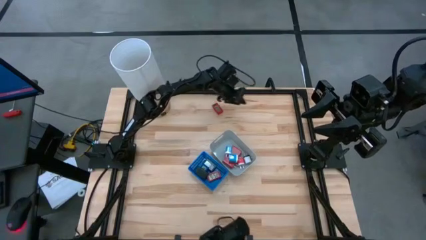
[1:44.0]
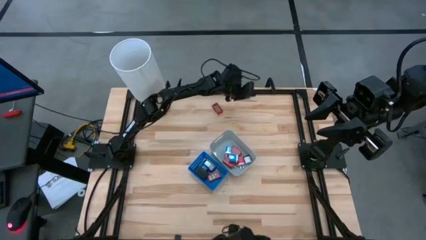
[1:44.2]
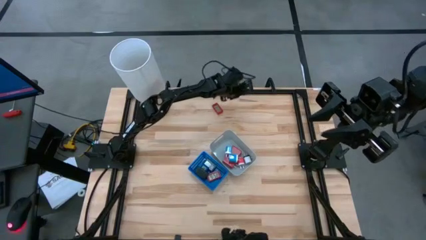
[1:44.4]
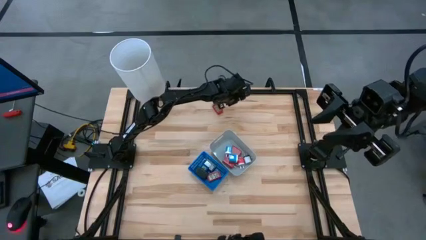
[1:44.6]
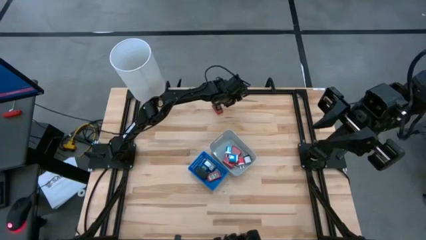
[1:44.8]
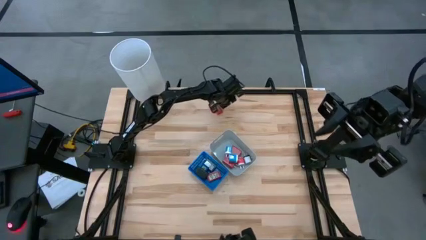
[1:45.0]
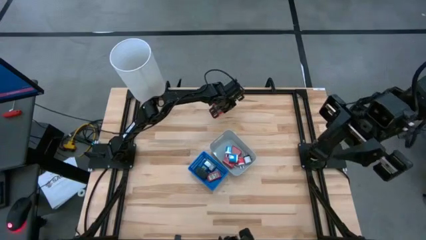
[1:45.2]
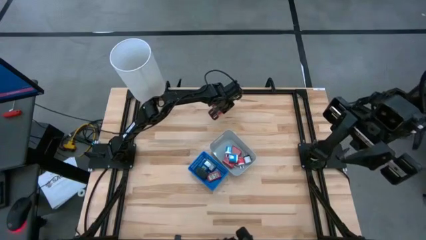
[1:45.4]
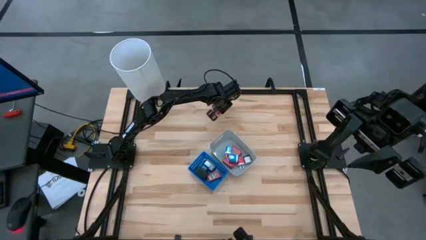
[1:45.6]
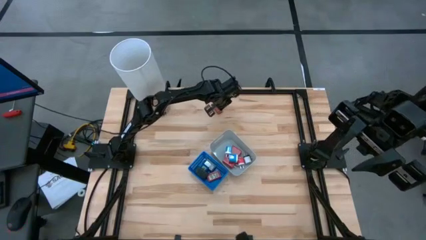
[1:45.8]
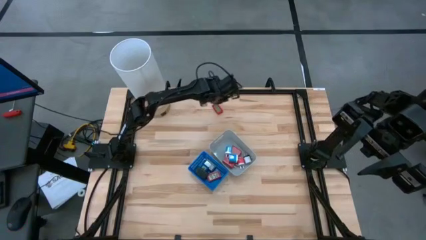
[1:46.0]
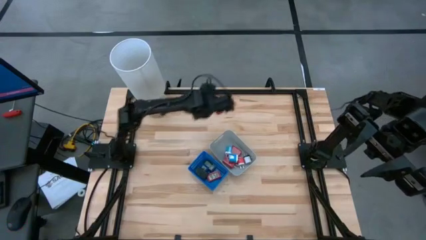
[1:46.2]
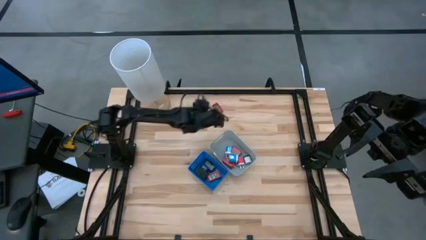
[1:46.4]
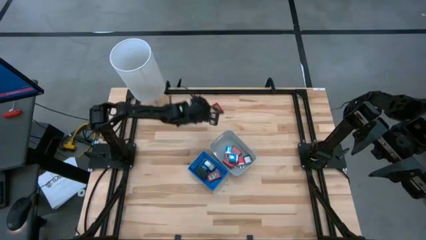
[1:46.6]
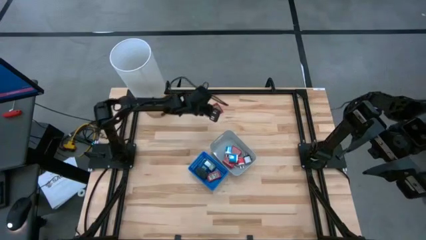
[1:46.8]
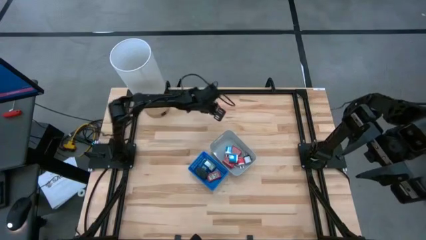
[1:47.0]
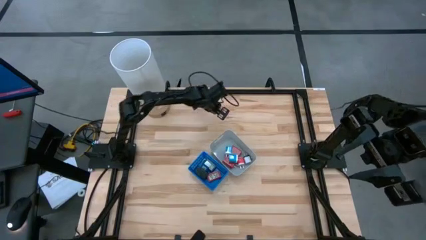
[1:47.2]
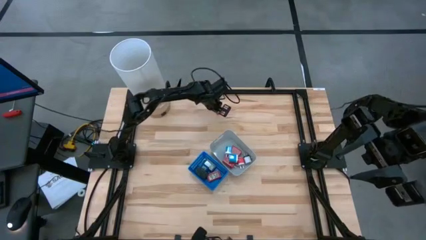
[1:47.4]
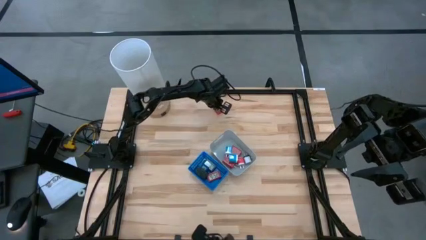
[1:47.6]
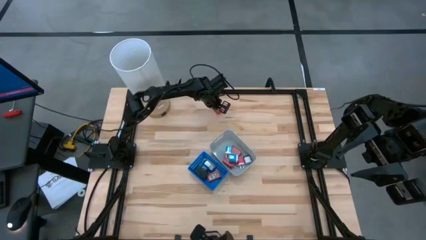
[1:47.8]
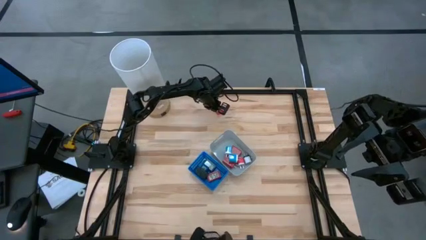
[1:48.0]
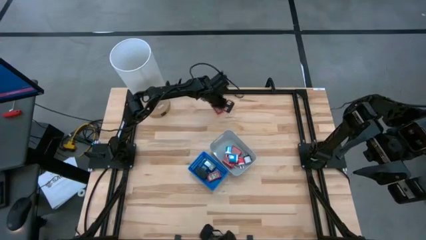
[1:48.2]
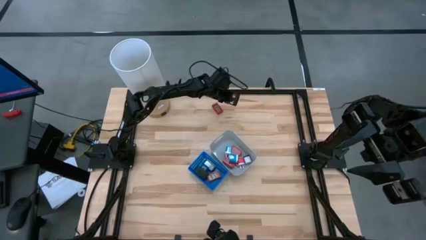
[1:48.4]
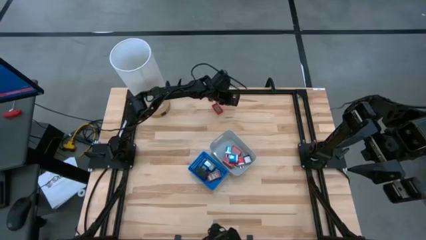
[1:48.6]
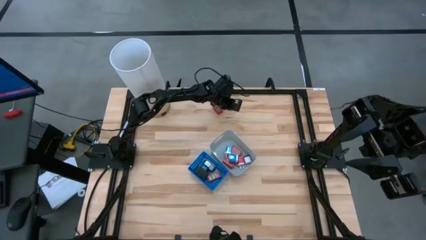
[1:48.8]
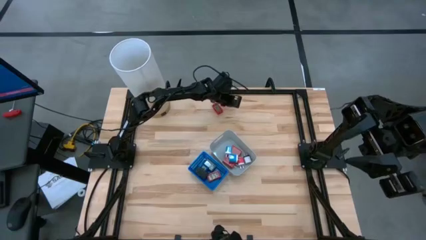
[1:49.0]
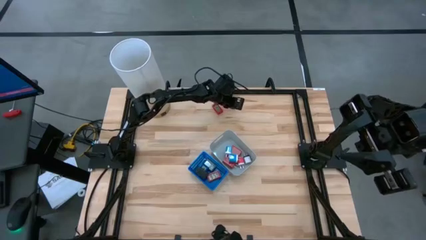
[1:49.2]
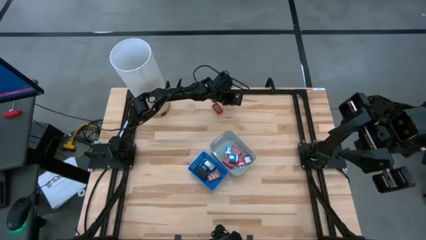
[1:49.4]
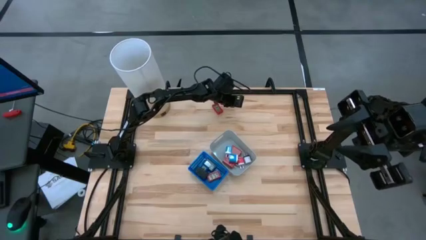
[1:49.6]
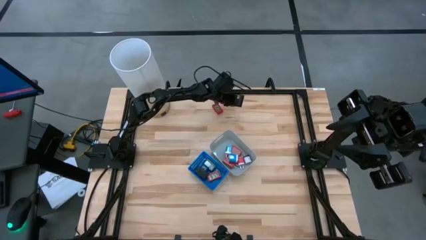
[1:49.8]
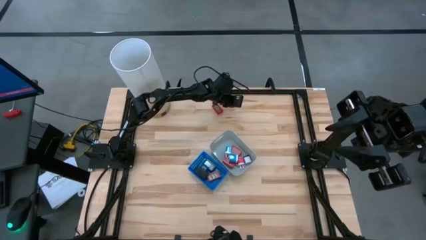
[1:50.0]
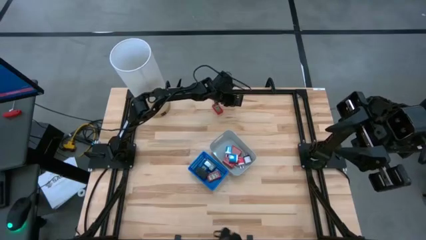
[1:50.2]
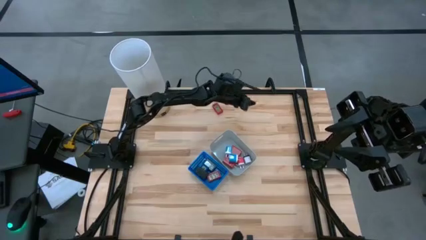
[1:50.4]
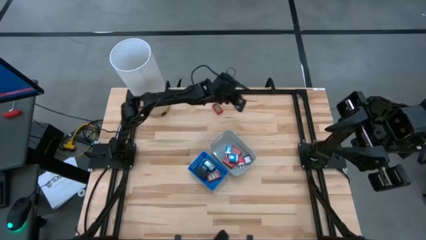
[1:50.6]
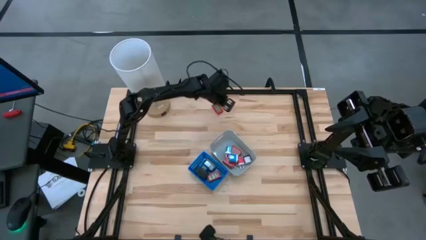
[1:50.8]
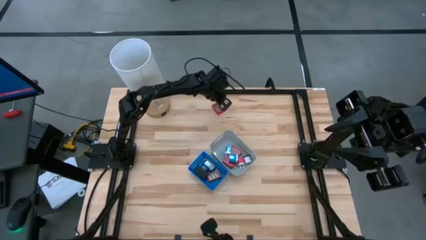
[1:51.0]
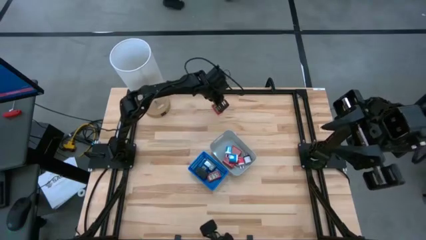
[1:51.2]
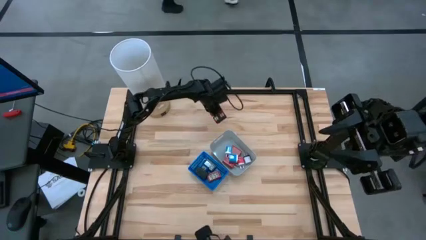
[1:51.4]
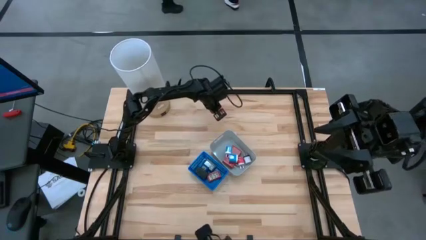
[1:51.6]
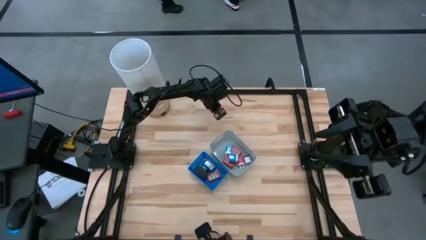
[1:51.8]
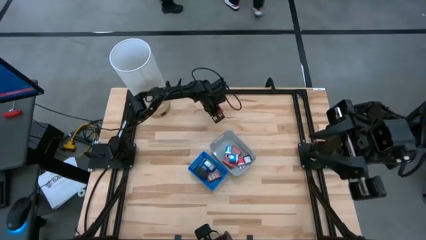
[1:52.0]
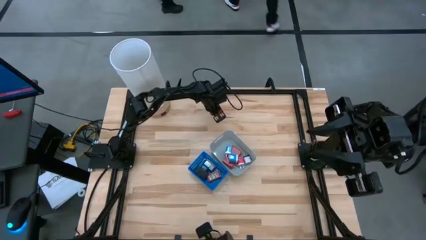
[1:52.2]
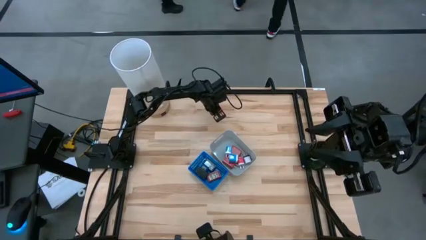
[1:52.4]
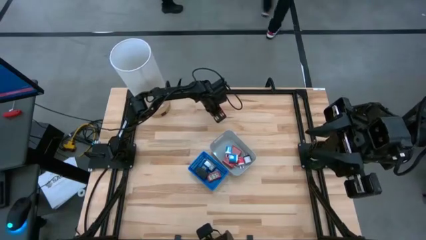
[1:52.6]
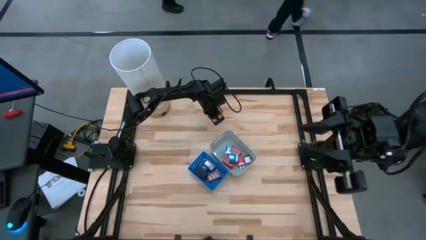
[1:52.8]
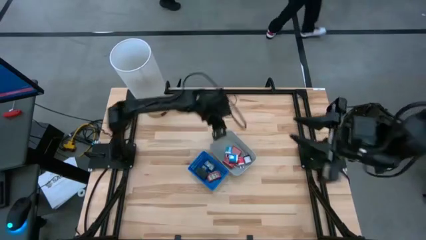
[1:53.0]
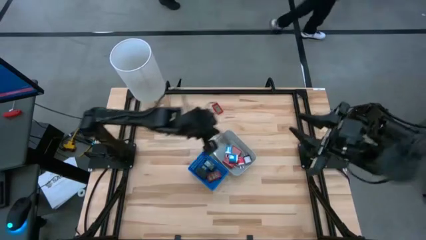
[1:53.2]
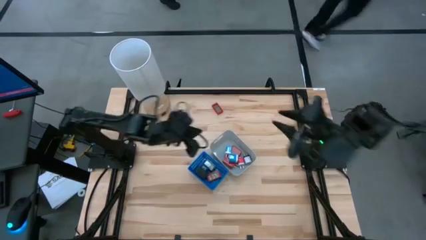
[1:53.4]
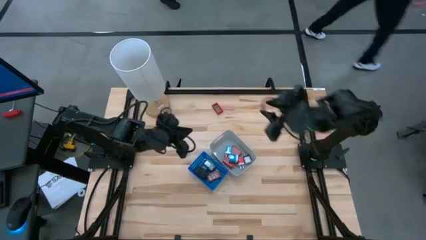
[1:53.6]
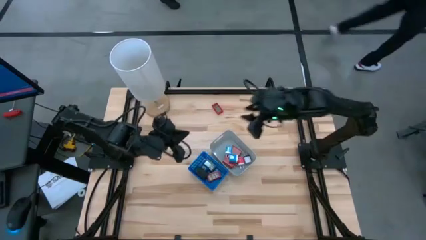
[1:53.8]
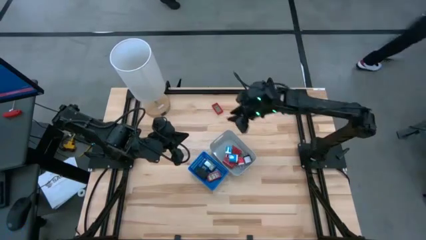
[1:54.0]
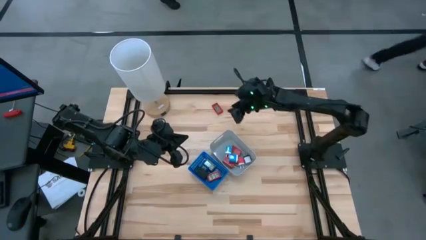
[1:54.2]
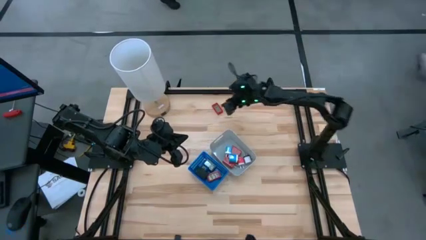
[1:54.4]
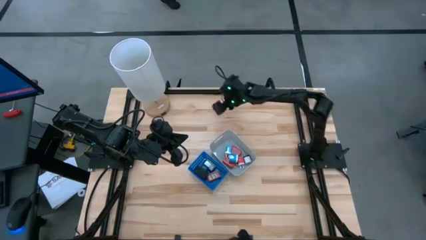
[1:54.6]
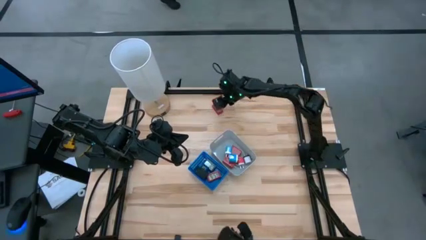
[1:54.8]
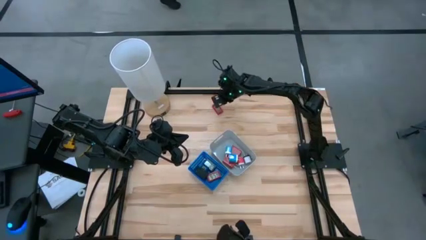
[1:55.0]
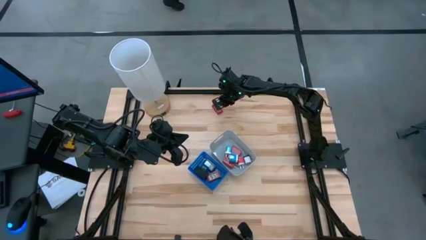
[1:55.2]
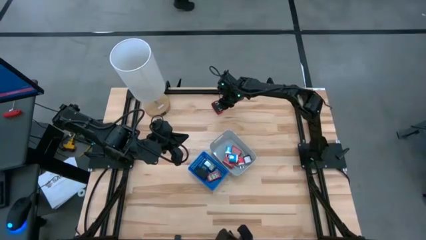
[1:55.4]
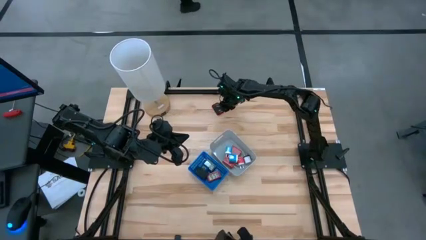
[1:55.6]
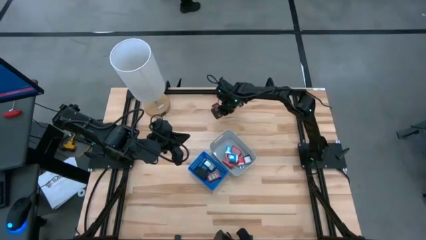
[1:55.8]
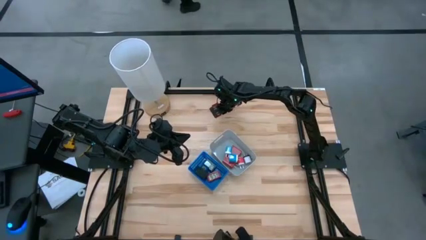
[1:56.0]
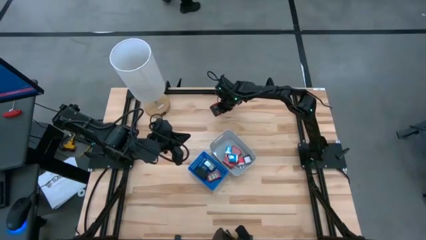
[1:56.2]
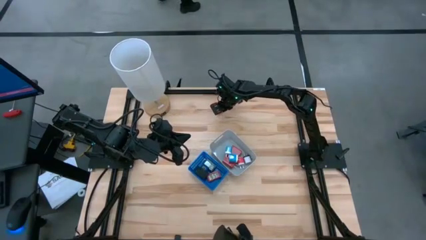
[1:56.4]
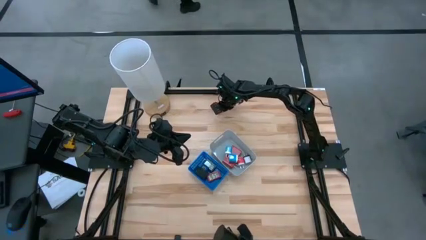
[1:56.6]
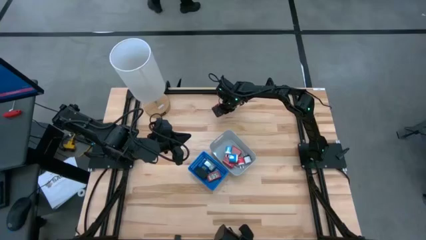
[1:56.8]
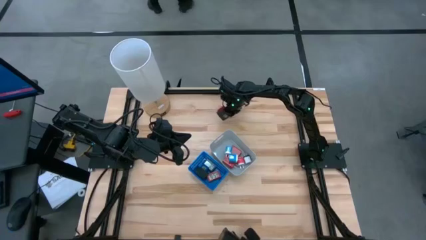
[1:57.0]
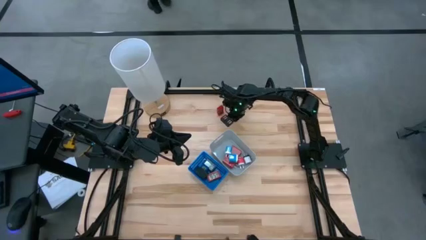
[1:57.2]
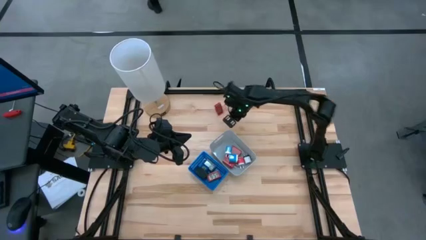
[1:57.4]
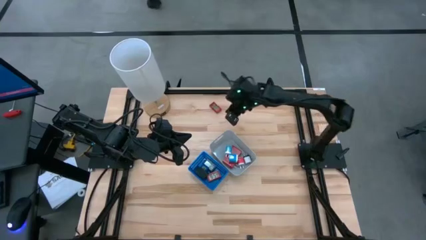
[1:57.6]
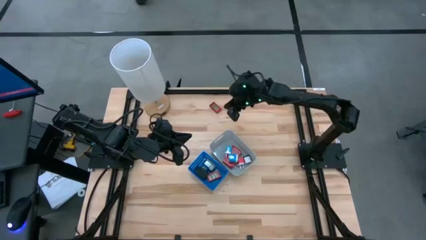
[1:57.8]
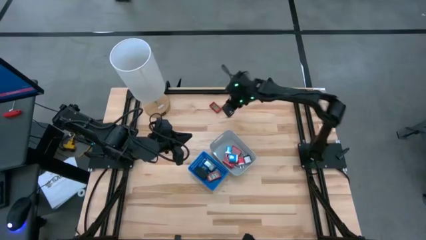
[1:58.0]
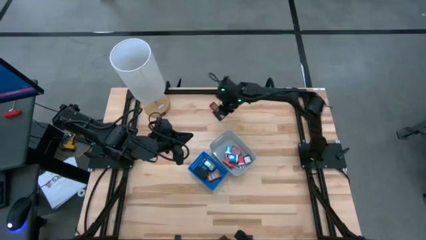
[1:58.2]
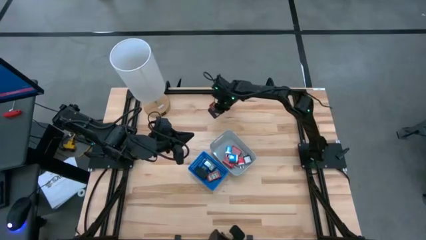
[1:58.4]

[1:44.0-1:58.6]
Task: Pick & Place Office items
Put the red digital timer into the blue bin
